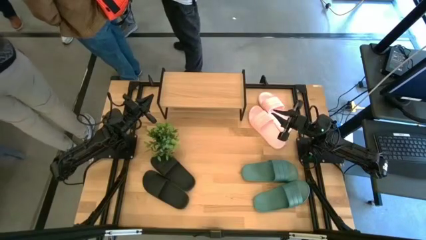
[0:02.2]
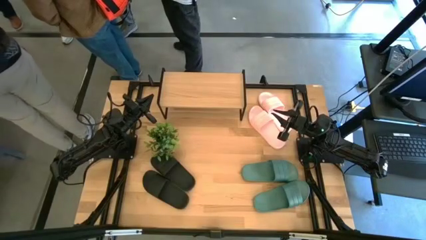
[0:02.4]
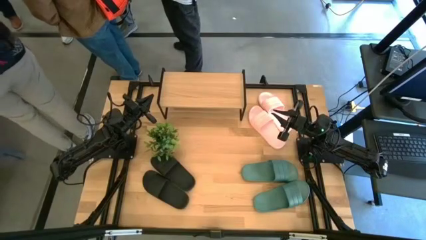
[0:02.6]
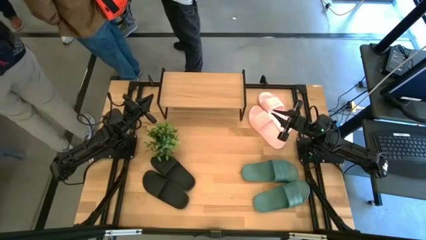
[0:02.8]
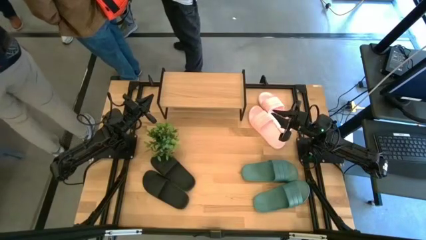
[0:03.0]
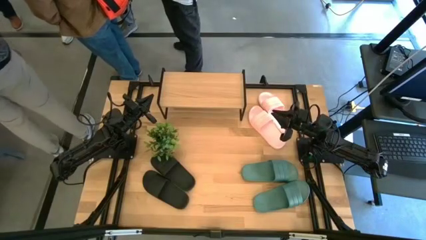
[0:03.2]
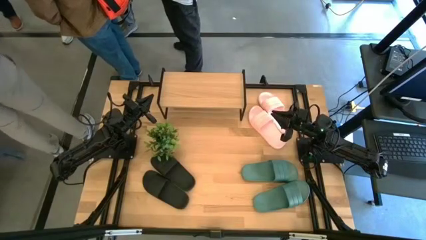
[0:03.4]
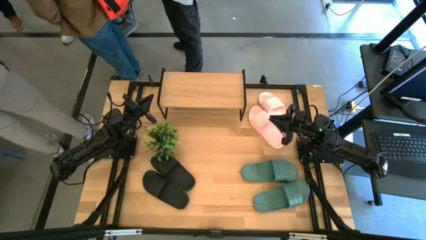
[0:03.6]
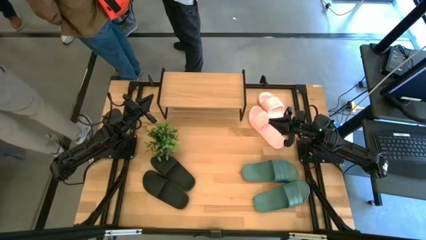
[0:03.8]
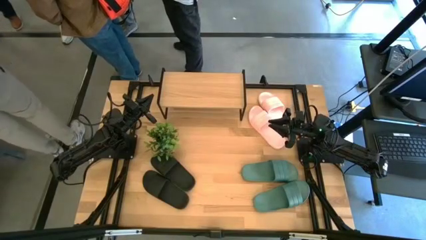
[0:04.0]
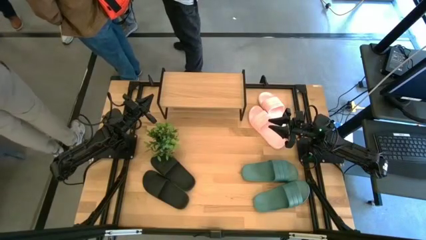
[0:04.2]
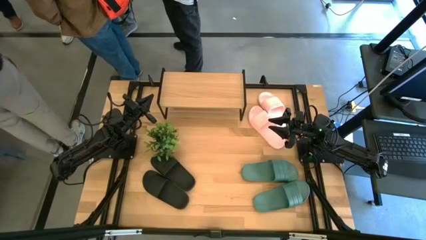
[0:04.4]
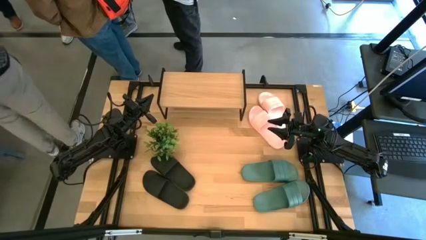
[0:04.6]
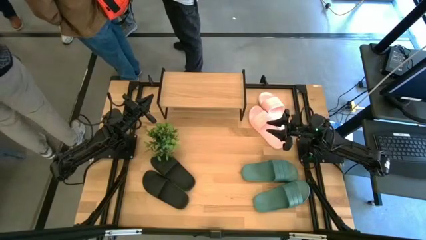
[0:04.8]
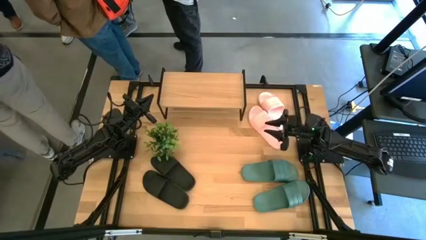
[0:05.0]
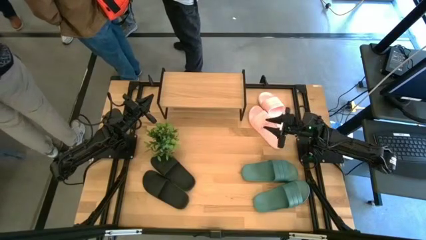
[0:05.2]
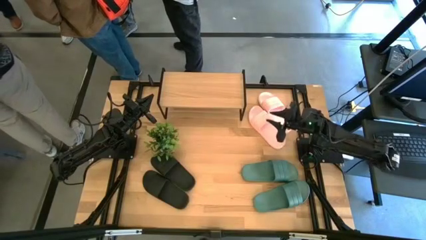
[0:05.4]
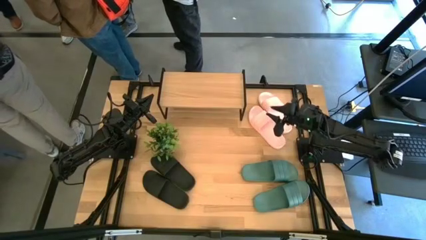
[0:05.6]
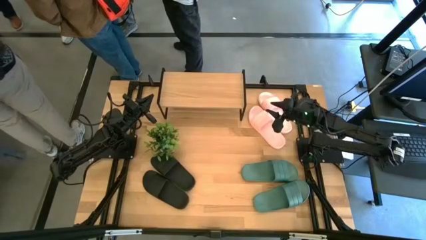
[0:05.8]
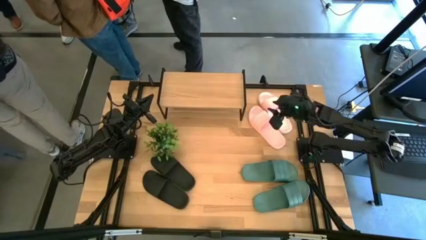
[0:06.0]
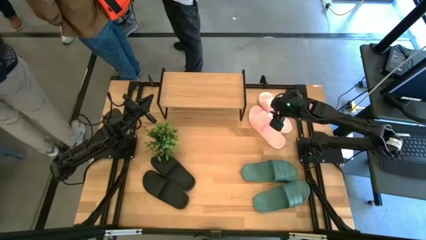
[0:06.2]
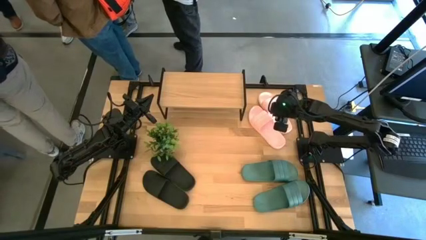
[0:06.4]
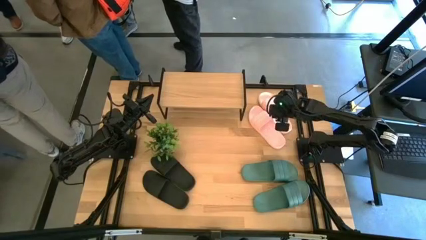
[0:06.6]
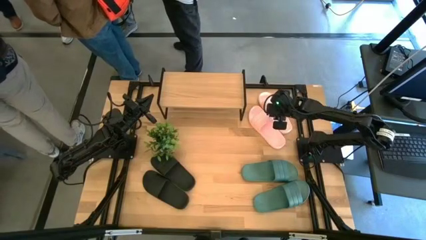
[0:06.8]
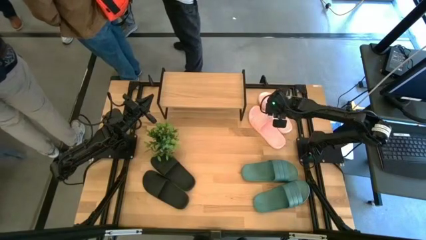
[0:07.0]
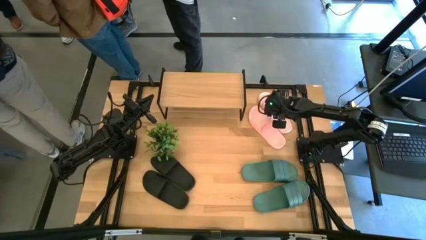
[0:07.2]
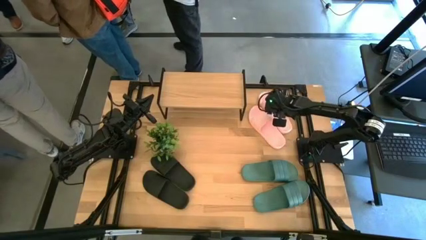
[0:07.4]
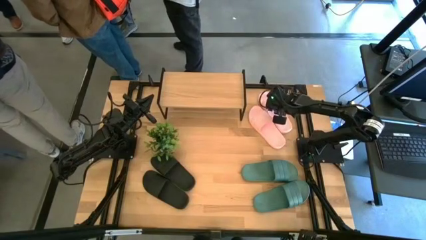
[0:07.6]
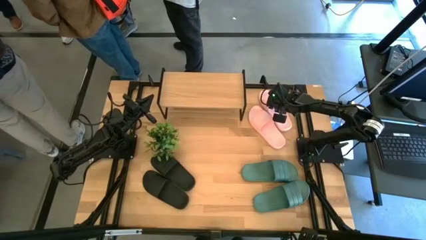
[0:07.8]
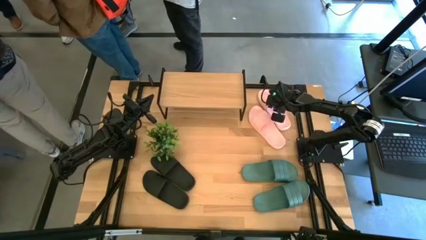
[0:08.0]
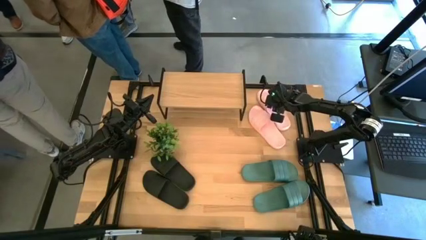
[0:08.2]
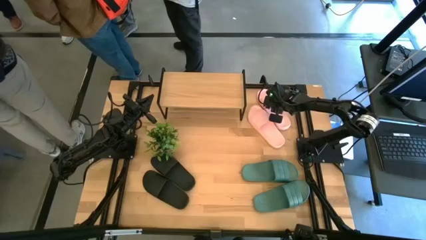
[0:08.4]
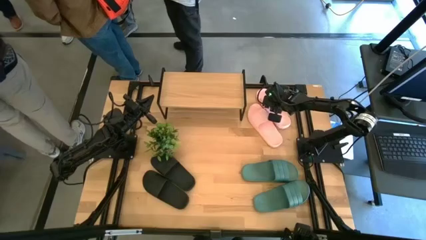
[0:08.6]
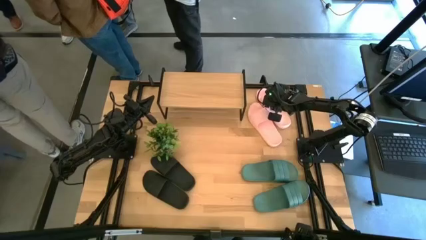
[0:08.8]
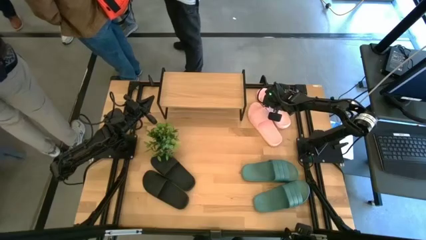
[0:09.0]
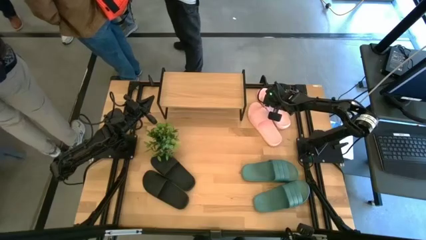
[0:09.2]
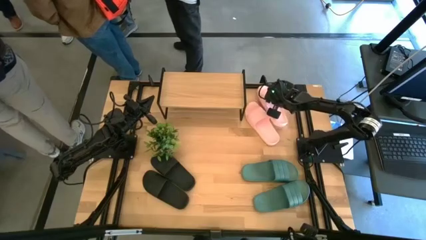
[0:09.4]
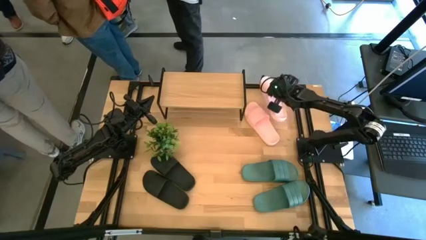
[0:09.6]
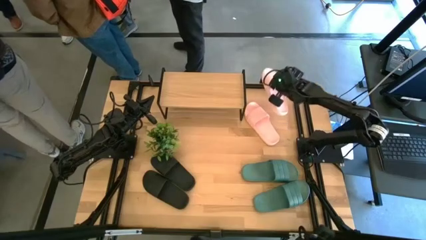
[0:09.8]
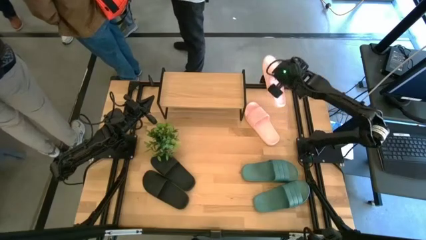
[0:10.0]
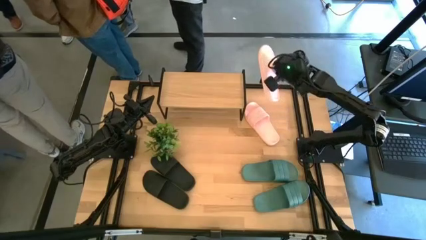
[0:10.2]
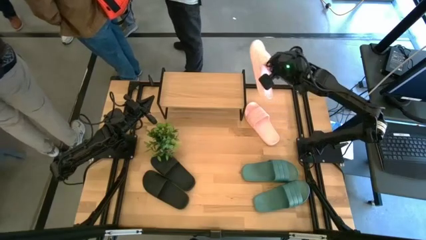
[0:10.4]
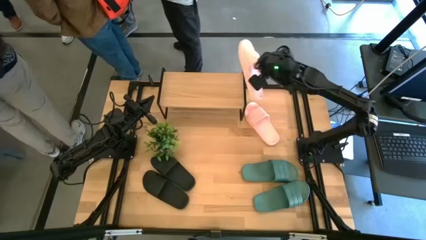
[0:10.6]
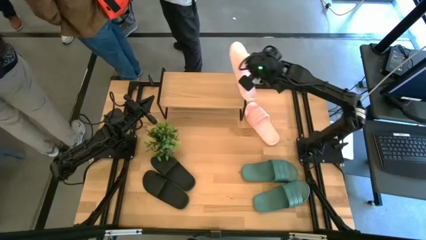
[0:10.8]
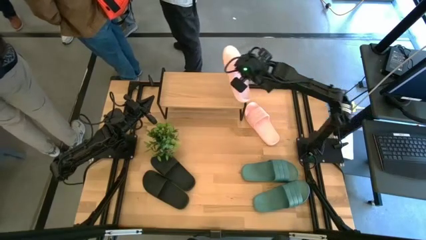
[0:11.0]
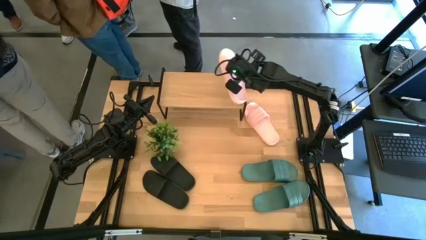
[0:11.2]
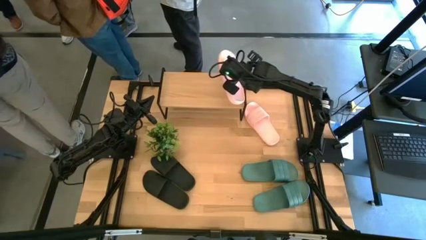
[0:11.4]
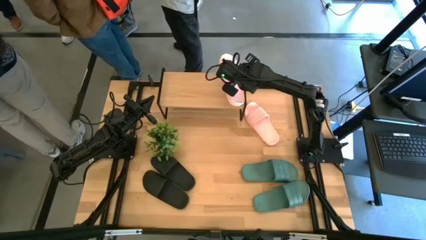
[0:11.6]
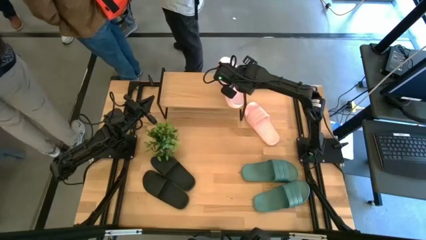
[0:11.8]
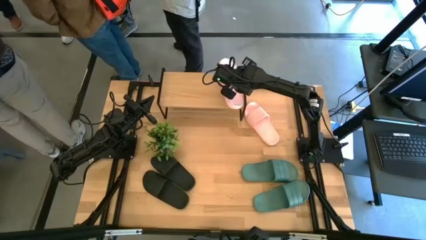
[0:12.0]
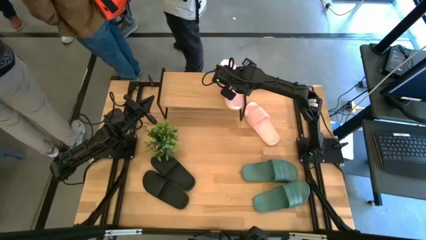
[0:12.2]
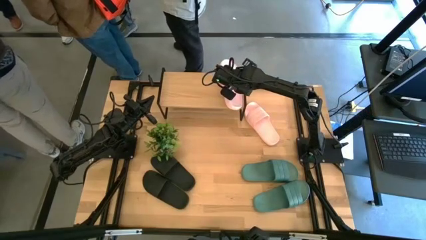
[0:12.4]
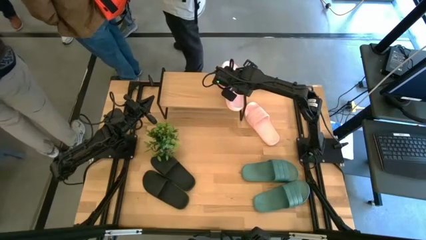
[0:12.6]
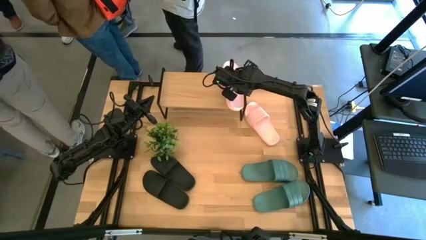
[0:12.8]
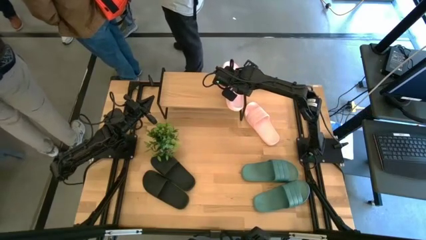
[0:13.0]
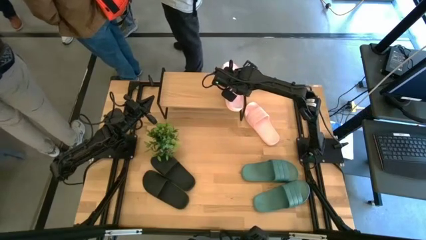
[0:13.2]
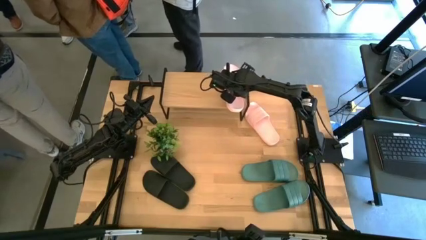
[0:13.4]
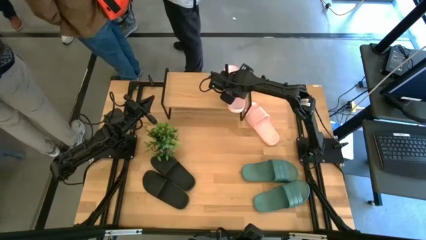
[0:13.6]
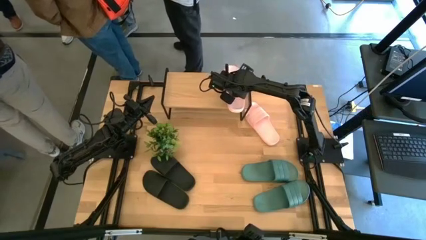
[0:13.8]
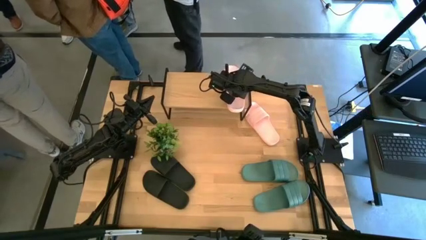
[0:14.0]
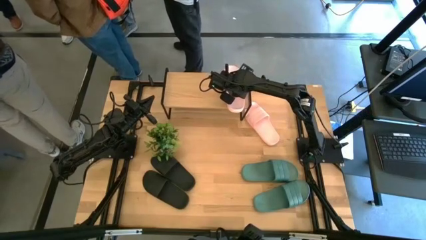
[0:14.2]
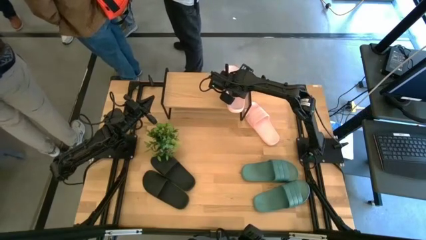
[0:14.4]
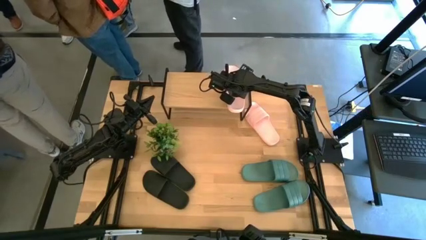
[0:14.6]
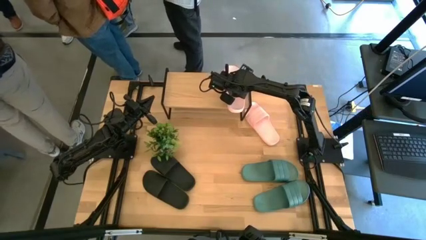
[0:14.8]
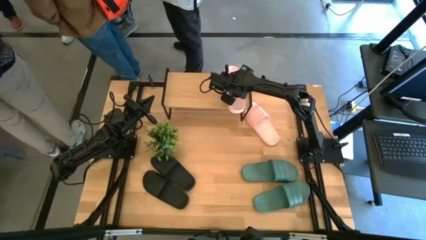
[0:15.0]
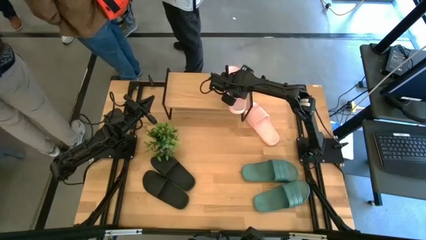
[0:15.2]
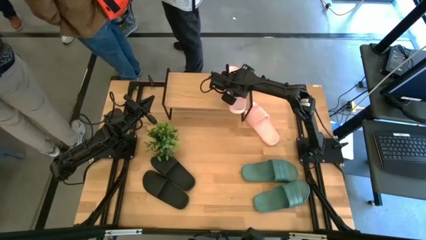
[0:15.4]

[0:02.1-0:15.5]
Task: Pick and place slides into the shelf
Put the right pink slide on the shelf
